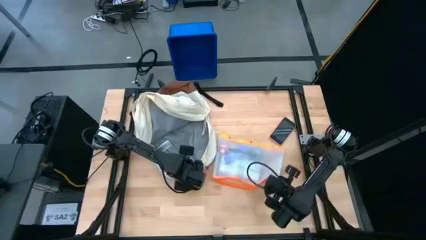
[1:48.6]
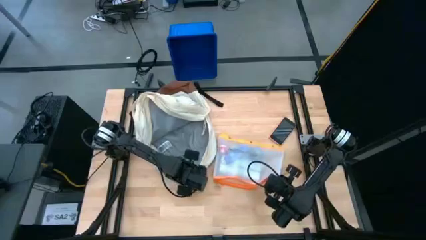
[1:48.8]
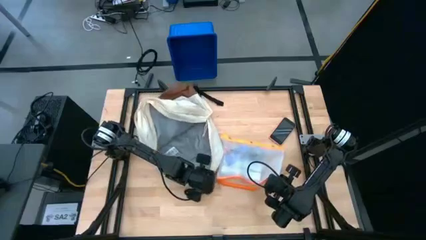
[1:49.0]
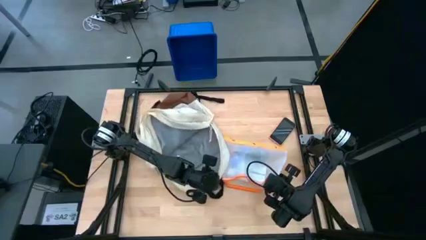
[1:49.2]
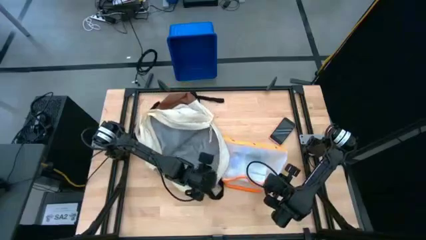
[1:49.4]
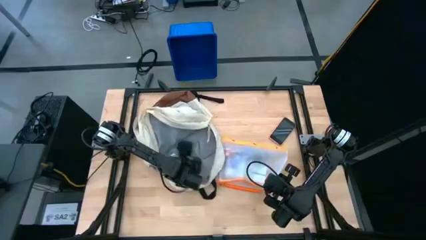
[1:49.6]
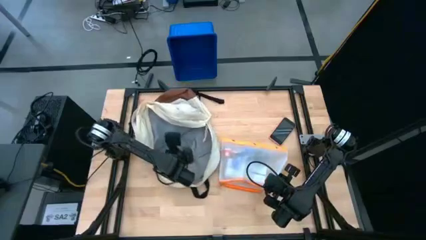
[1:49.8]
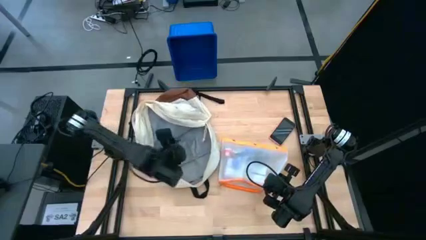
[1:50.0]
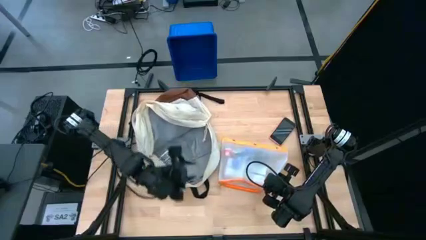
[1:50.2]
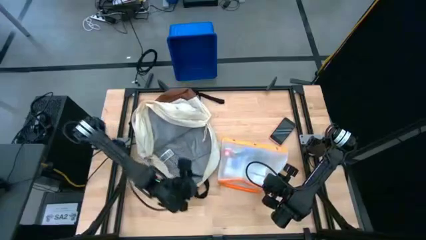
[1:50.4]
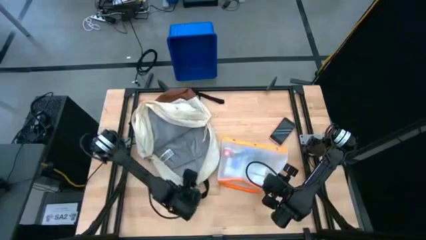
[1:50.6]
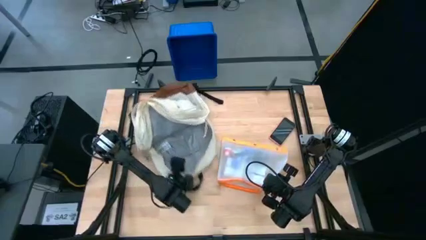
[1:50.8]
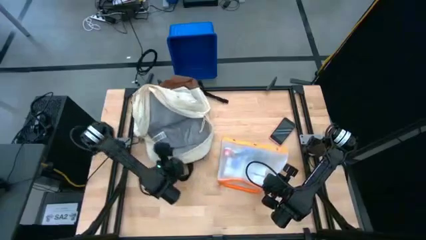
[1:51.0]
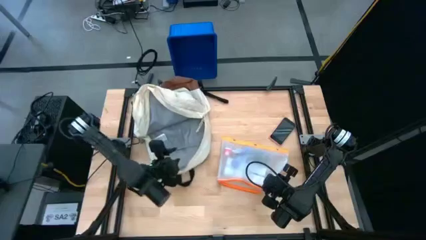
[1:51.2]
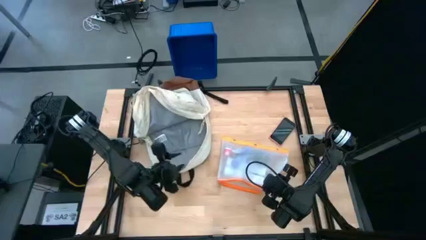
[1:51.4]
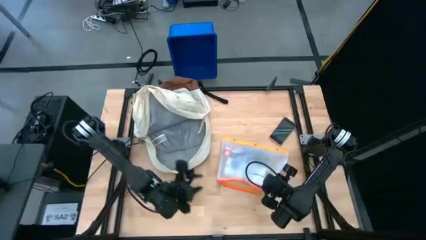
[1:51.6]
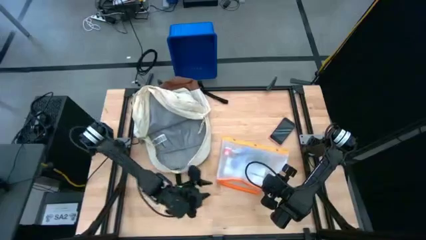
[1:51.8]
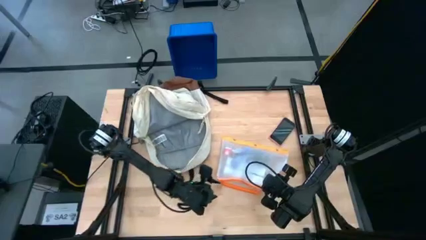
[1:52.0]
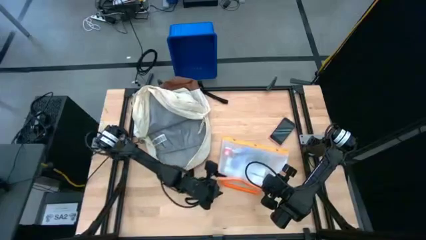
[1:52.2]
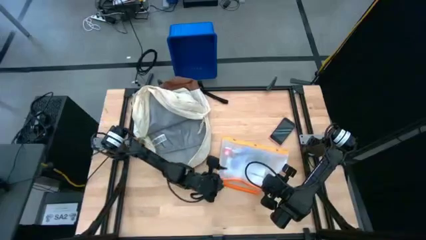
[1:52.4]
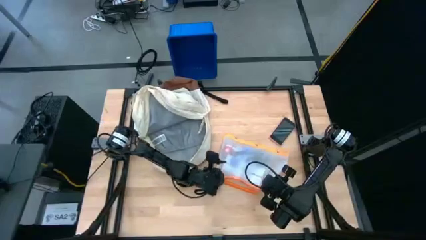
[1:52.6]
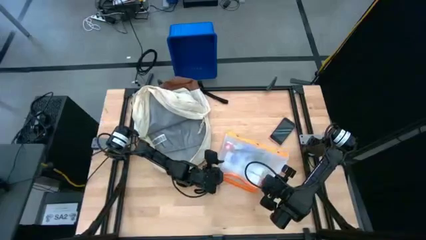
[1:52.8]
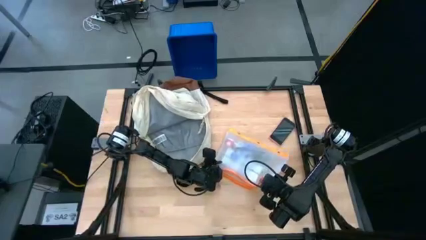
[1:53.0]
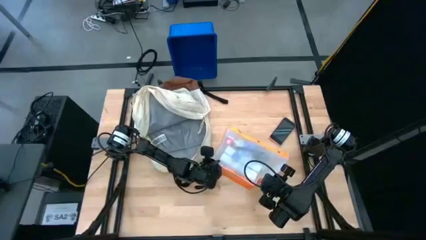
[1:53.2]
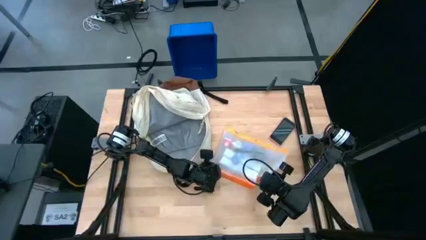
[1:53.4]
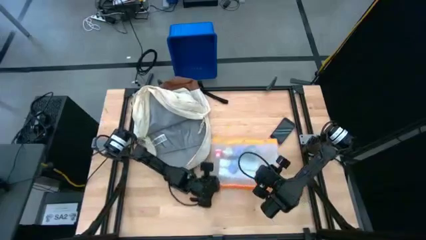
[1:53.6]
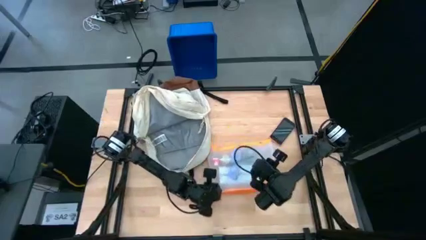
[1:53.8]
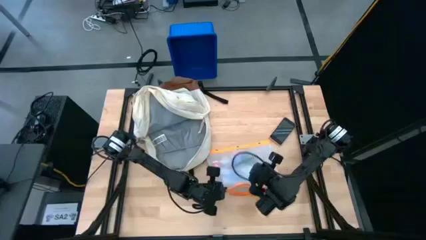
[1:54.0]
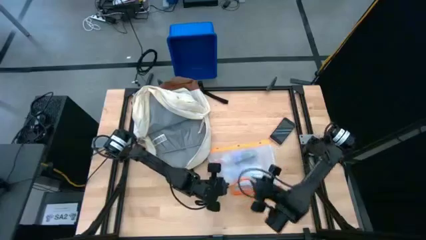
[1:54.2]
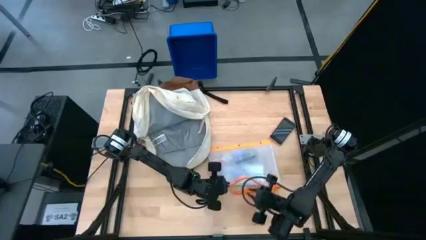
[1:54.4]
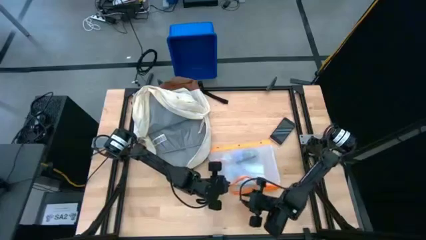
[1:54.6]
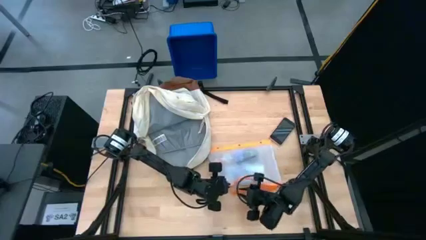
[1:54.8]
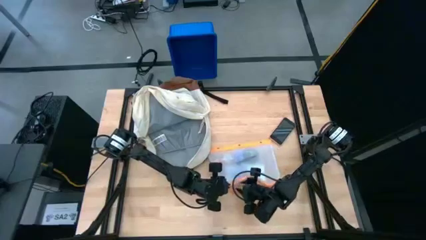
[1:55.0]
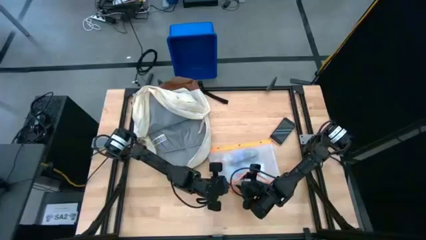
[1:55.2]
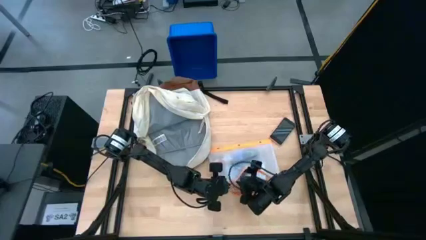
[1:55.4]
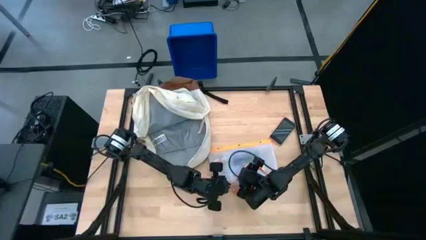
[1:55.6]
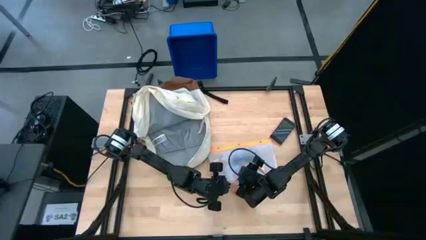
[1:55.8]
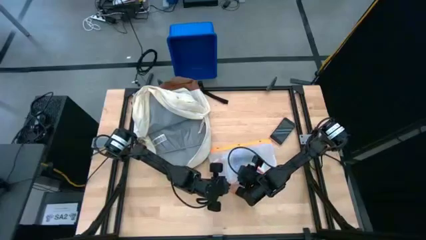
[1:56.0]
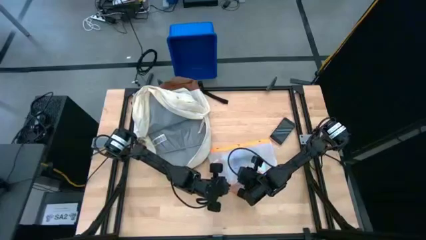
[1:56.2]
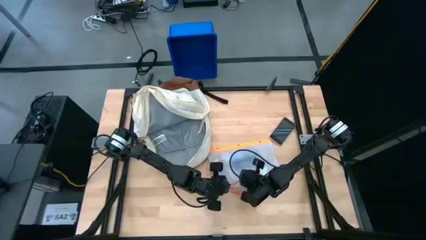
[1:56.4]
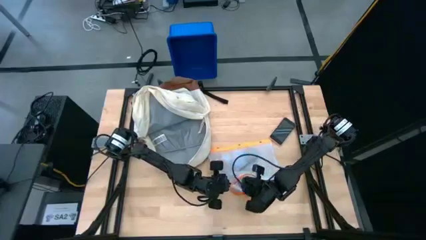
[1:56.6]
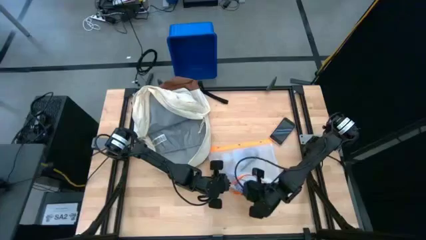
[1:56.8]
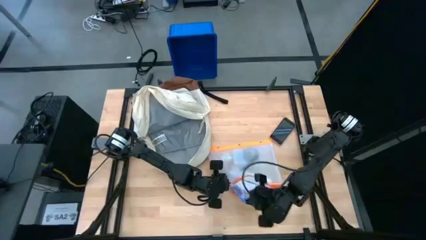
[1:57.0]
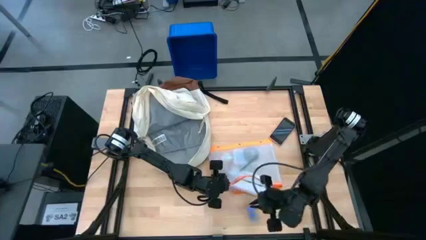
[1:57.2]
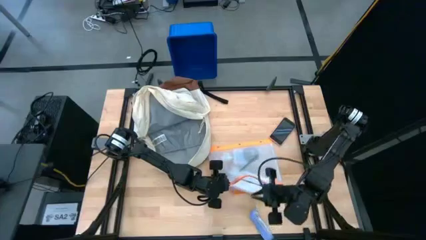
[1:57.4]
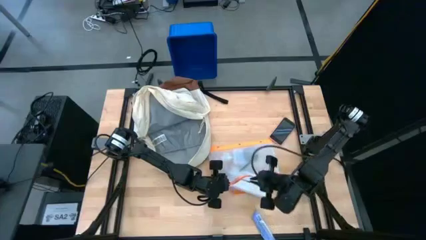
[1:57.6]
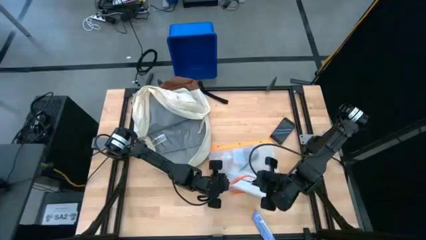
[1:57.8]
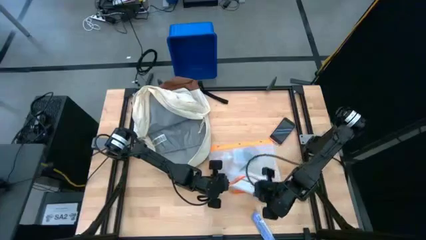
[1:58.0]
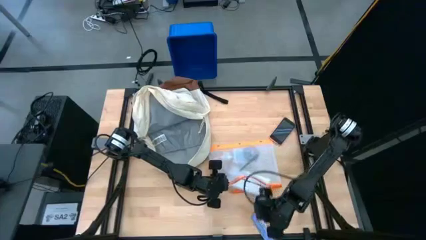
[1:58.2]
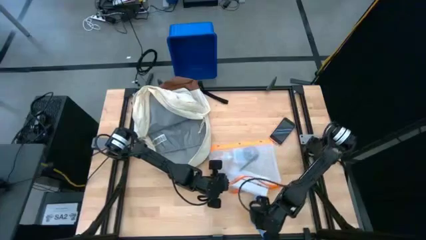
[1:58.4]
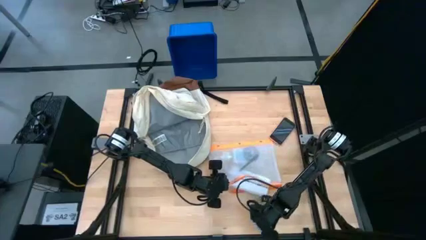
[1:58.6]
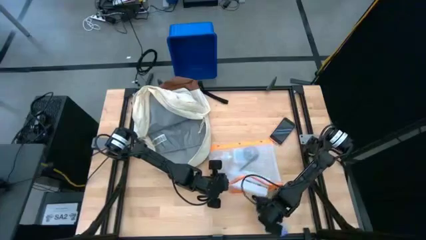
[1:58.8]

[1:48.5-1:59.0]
Task: Unpack backpack
Remove the violet granola bar from the zip bag

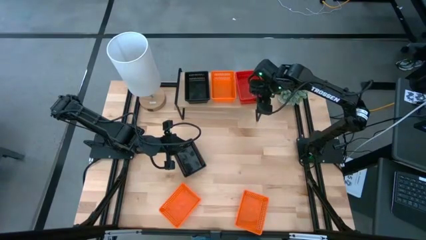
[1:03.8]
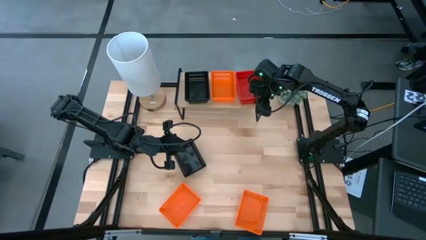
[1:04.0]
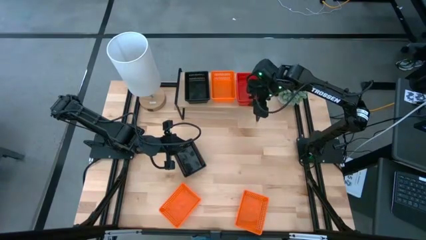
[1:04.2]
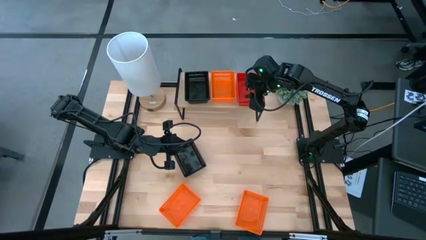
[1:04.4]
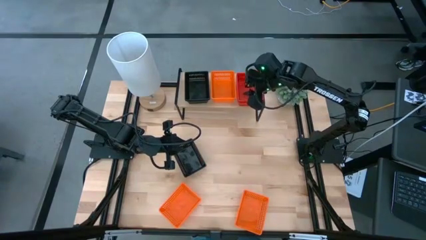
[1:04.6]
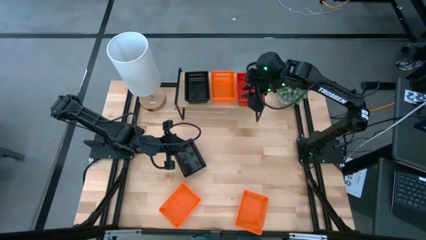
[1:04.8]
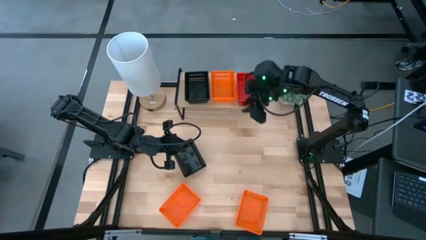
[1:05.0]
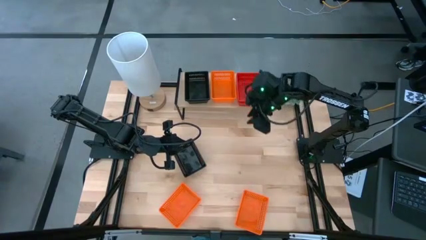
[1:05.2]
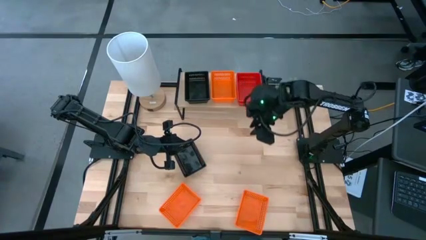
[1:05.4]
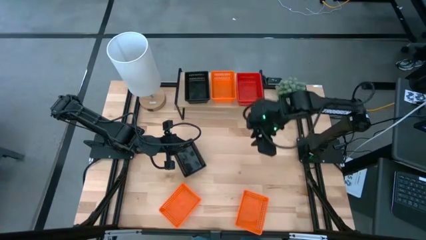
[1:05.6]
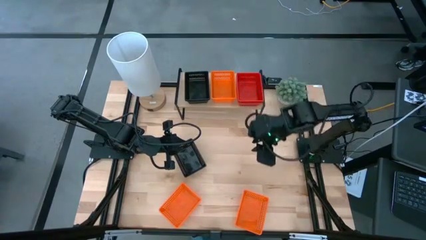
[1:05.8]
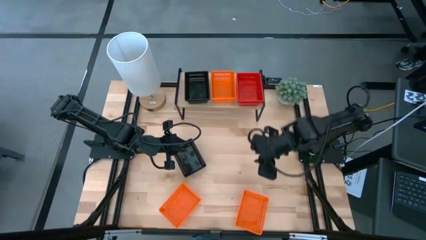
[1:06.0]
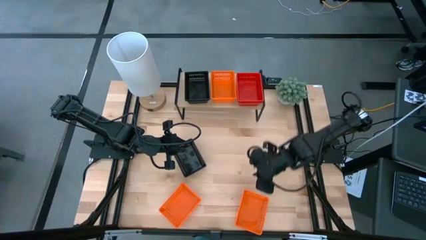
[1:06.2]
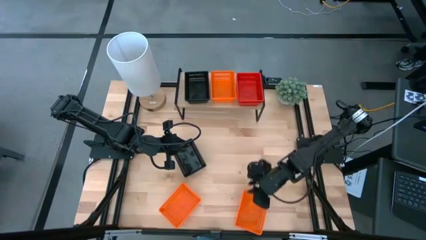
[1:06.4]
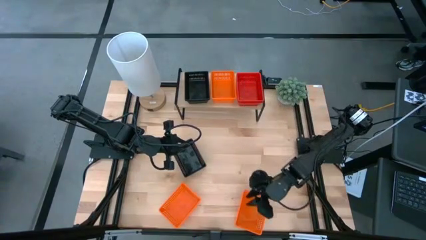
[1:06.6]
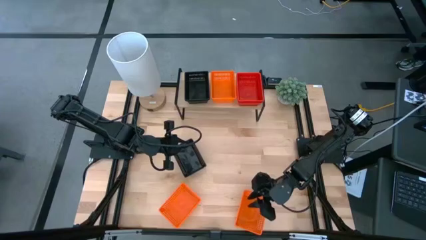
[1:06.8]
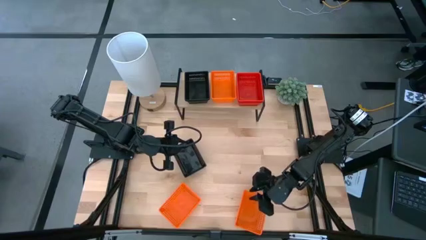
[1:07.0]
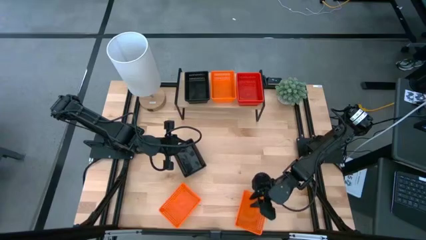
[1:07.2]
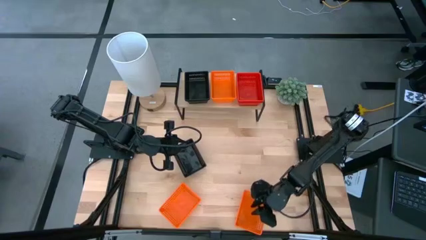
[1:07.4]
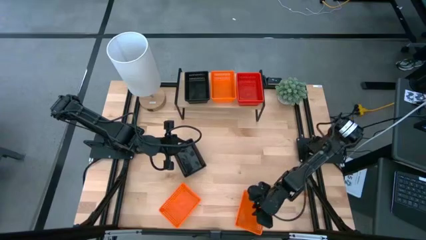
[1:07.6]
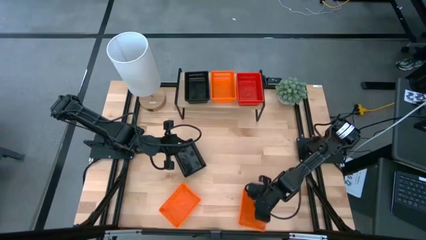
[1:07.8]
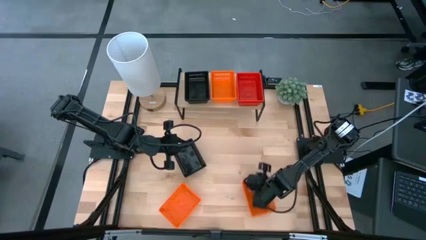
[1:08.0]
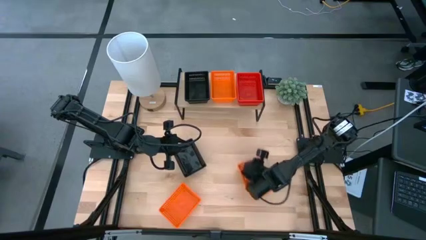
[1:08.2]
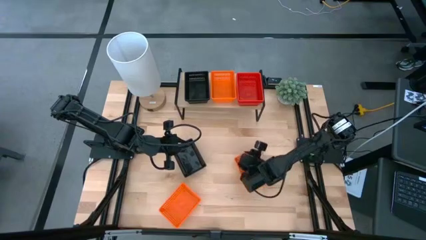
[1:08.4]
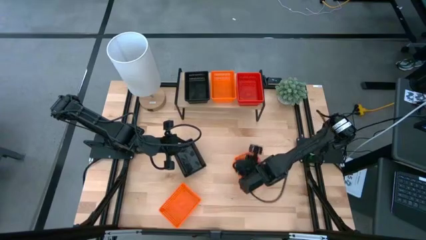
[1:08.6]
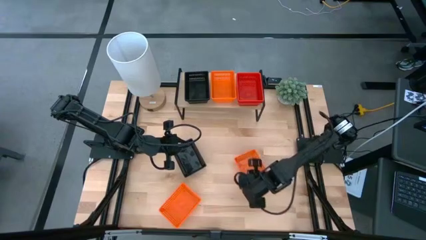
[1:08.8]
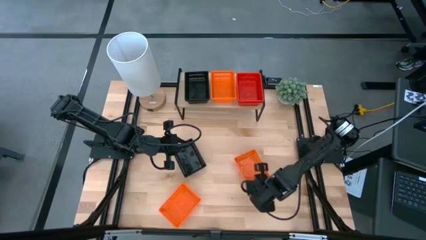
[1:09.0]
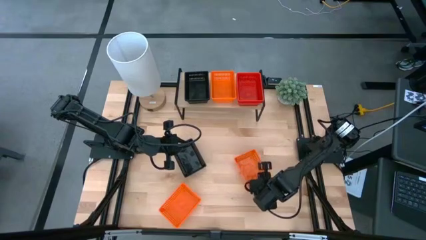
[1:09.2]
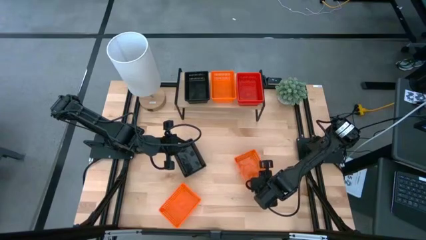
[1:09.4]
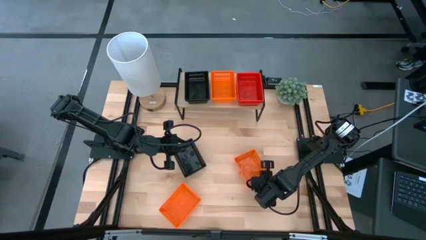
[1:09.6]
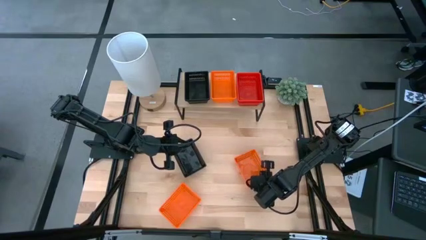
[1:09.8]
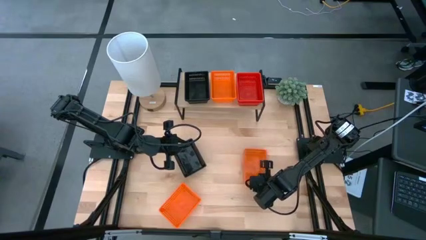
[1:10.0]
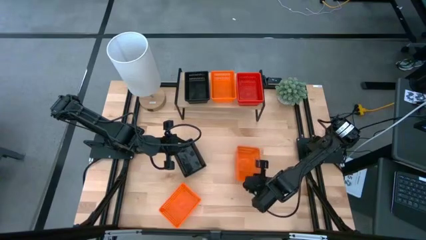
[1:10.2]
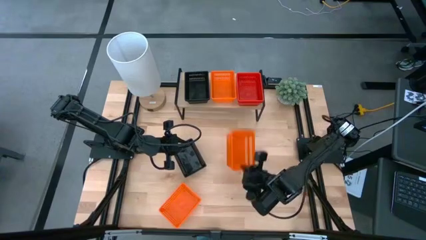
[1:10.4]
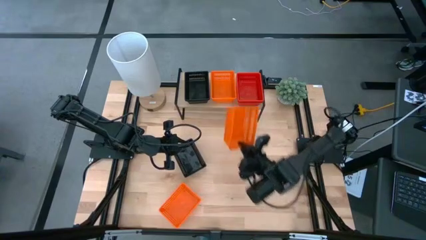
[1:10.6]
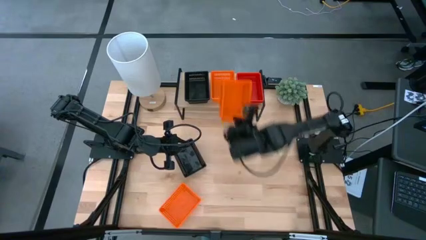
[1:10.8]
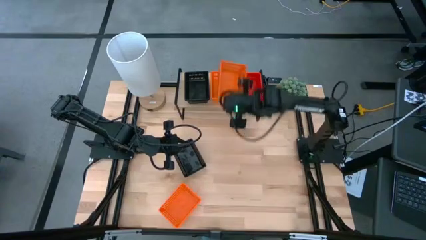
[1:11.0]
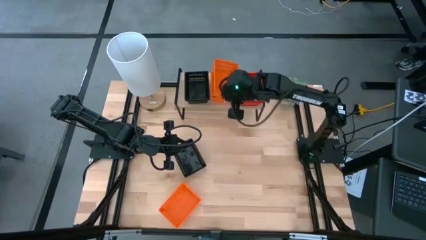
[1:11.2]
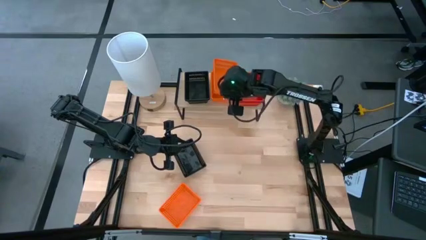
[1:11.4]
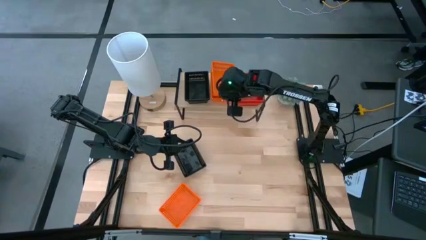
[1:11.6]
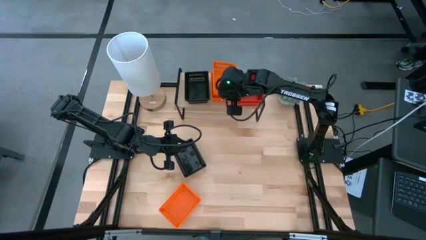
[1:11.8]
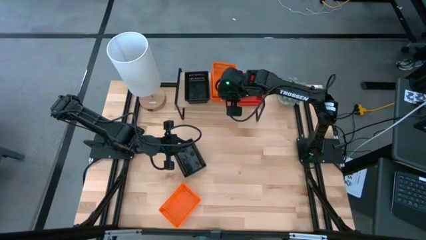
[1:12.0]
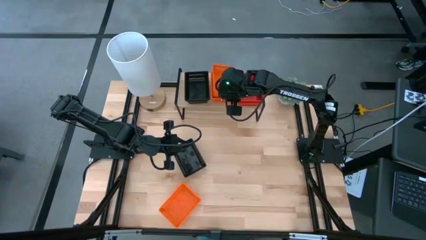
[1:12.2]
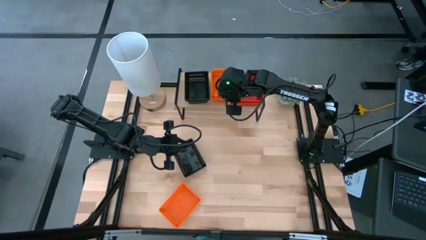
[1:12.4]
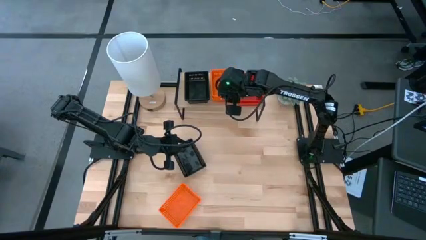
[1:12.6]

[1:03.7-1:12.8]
Task: Stack baskets on shelf by color
Stack the right orange basket on top of the orange basket on the shelf
